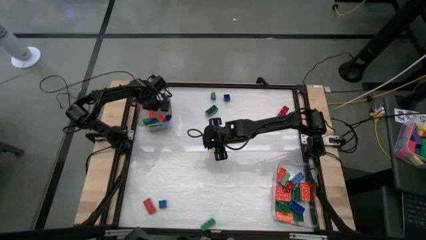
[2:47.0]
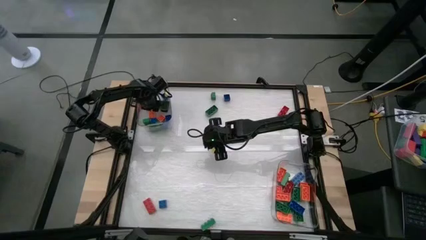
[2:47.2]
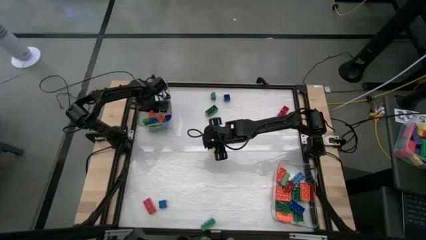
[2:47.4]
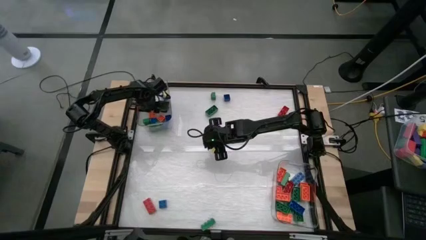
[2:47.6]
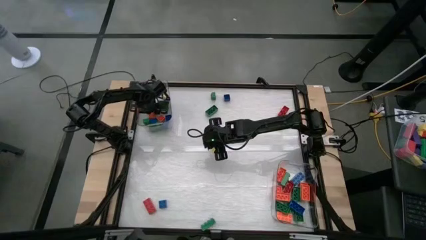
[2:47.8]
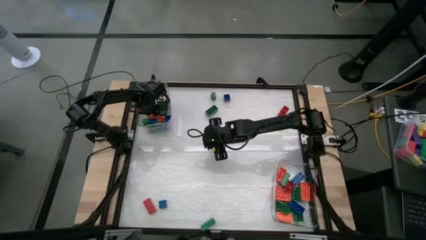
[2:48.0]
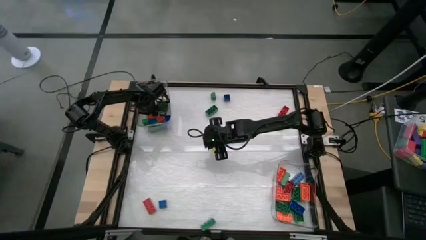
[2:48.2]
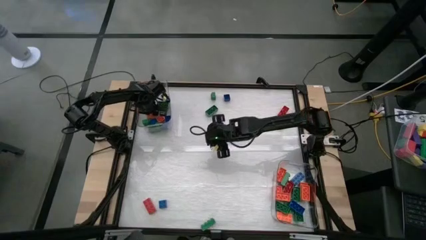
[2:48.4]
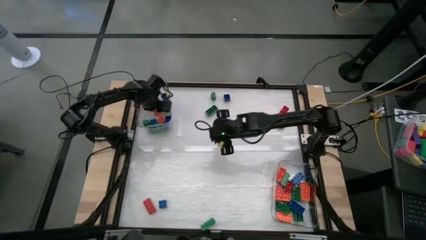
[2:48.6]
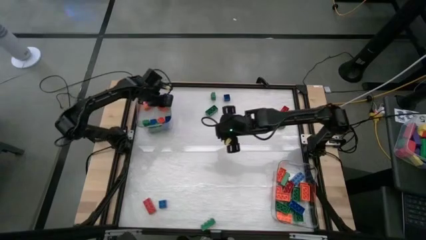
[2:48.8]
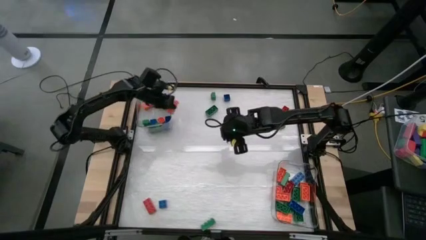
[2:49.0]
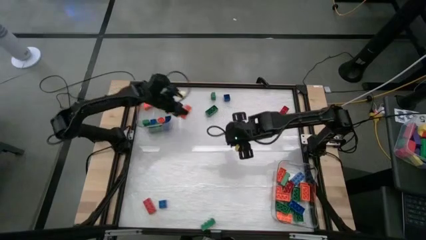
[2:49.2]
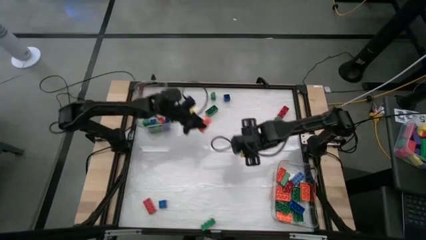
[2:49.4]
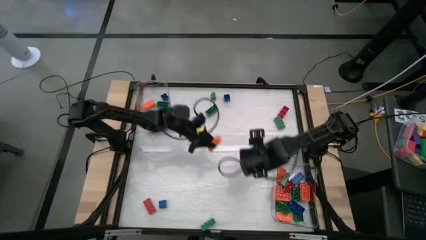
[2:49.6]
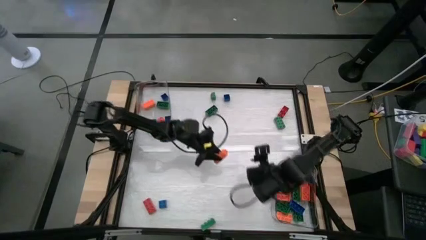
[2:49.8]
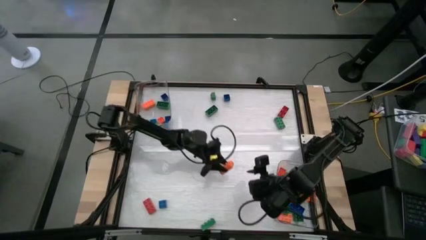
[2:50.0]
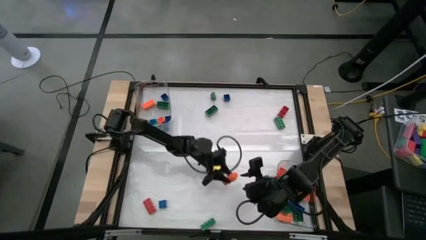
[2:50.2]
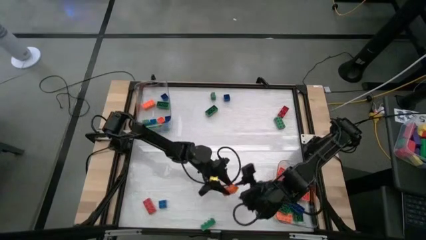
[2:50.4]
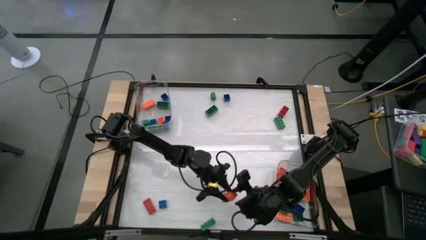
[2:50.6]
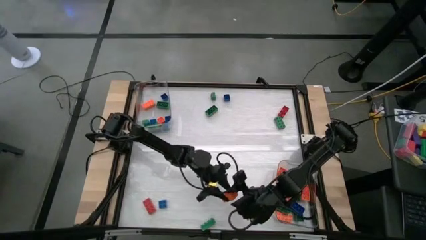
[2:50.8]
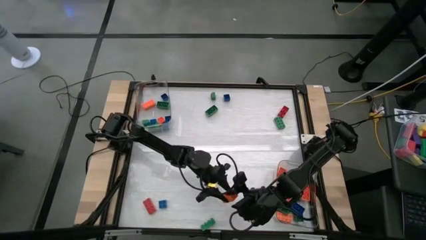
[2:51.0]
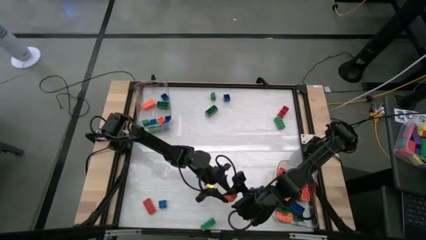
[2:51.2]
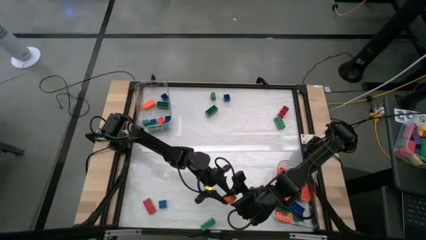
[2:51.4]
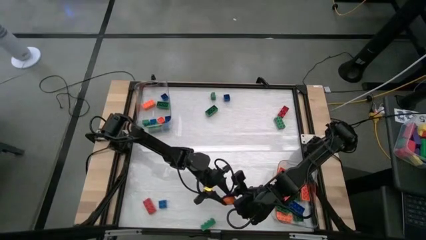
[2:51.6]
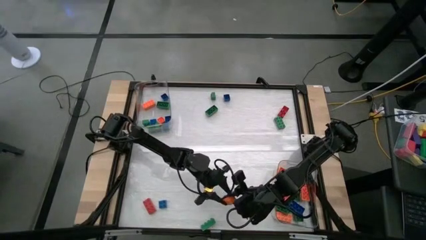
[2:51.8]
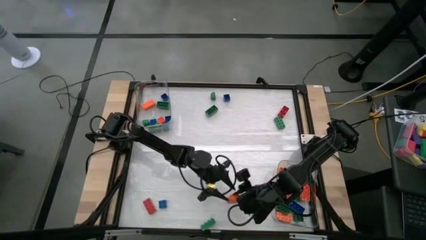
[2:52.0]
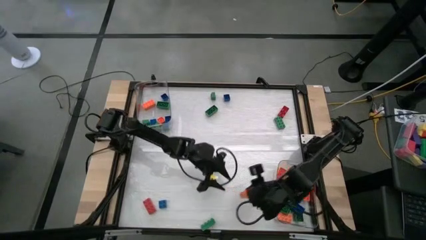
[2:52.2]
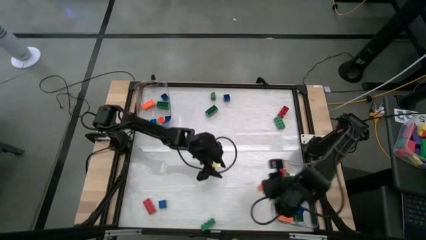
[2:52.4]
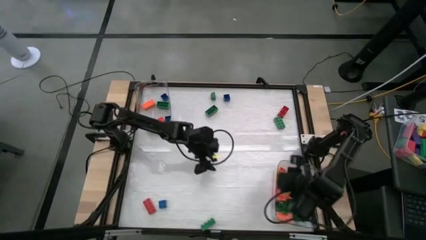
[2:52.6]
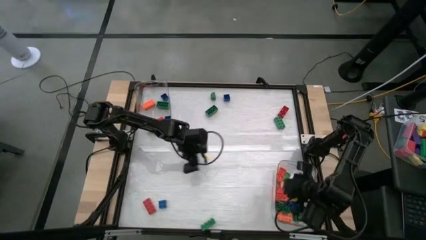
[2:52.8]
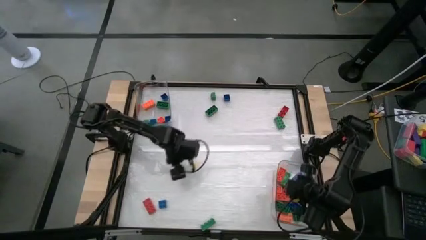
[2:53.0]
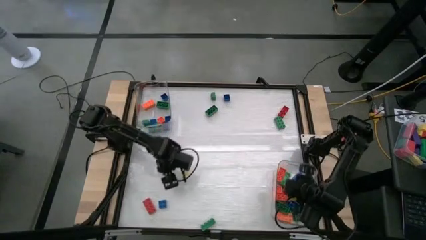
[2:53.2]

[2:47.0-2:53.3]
Task: Sort blocks by size
Put the 8 stud orange game piece into the bottom transparent bin

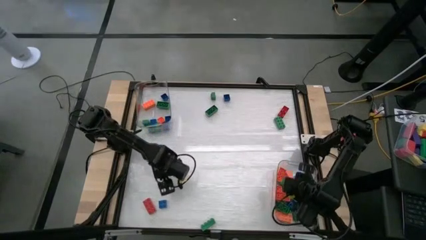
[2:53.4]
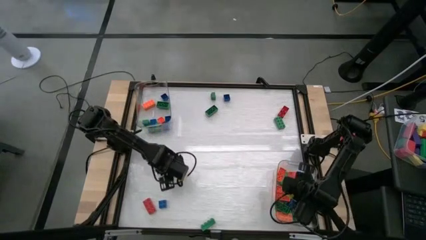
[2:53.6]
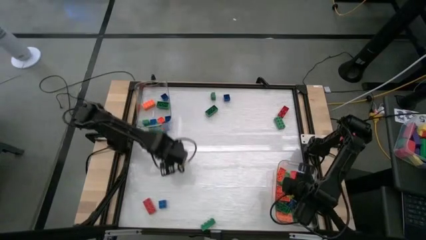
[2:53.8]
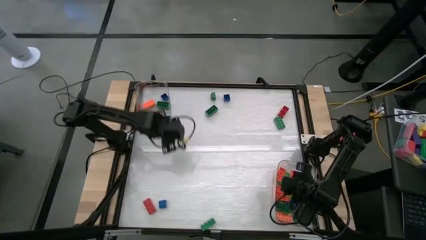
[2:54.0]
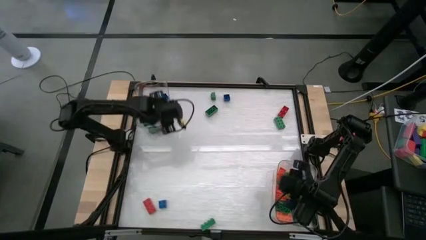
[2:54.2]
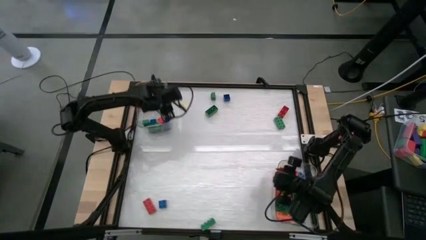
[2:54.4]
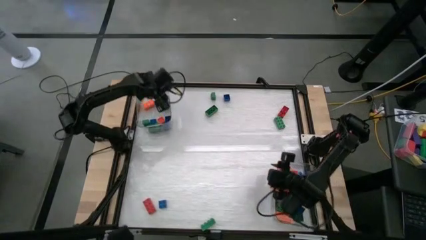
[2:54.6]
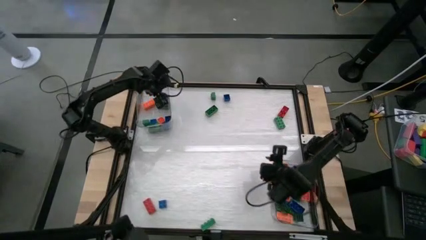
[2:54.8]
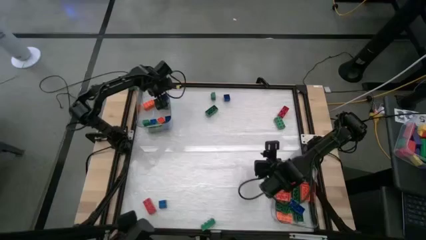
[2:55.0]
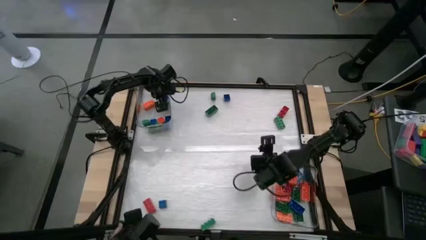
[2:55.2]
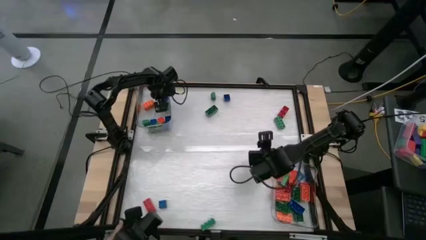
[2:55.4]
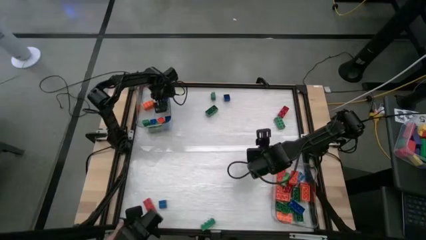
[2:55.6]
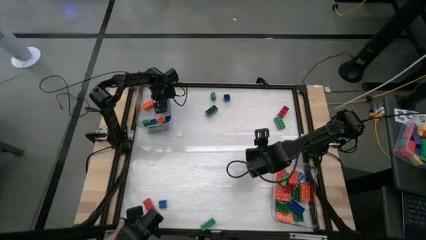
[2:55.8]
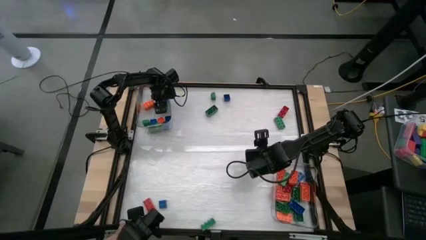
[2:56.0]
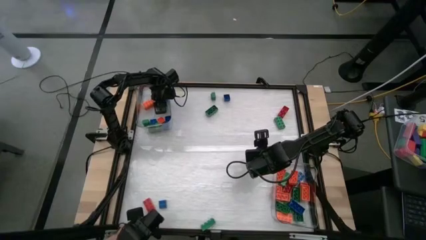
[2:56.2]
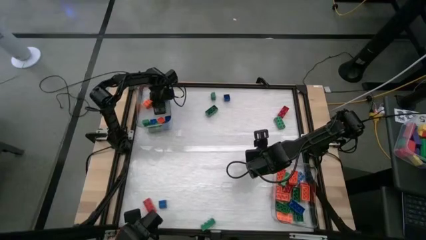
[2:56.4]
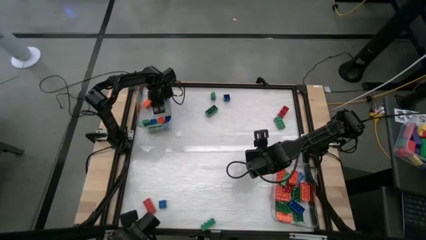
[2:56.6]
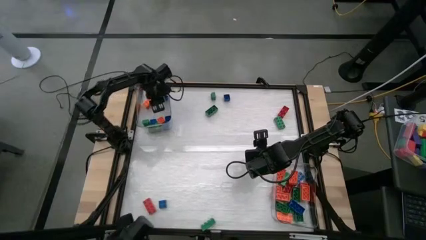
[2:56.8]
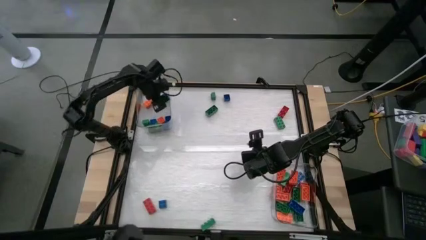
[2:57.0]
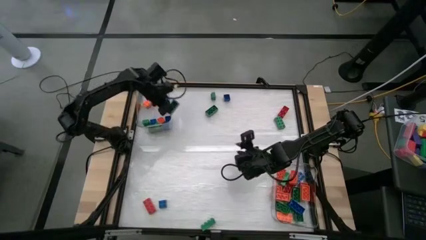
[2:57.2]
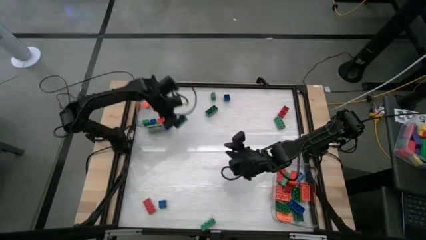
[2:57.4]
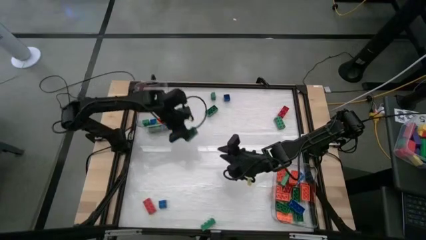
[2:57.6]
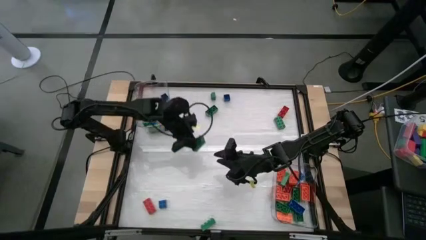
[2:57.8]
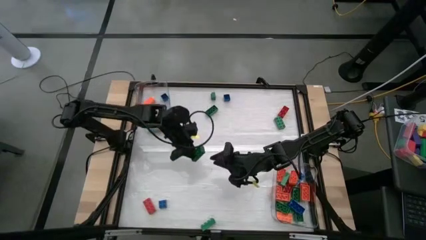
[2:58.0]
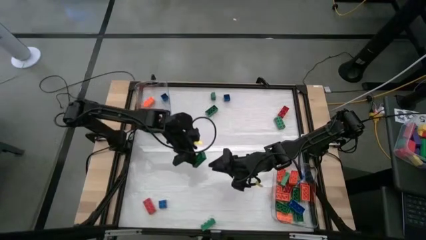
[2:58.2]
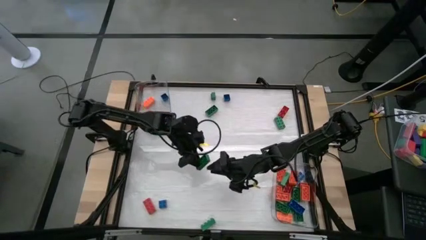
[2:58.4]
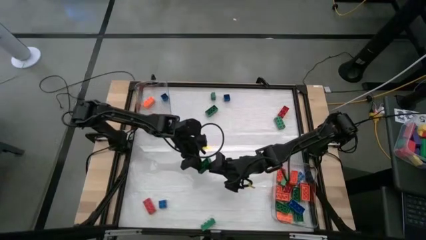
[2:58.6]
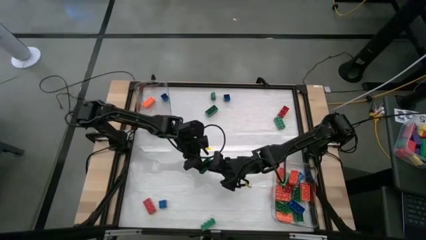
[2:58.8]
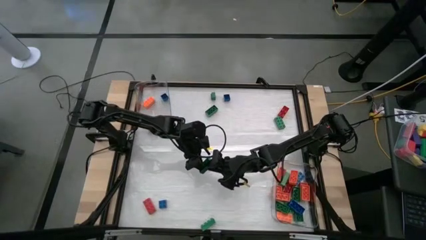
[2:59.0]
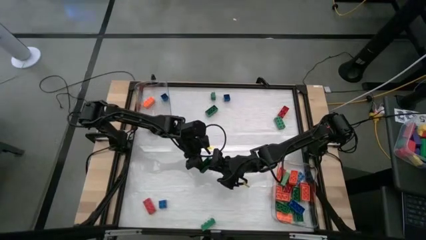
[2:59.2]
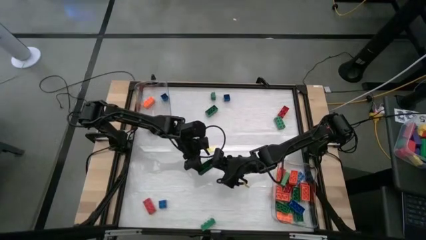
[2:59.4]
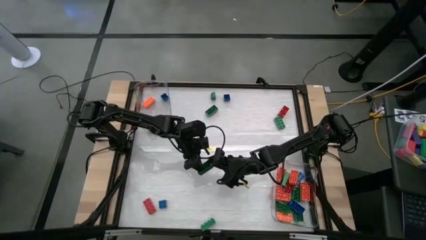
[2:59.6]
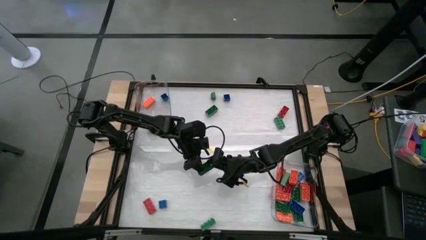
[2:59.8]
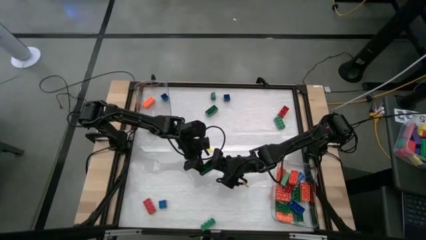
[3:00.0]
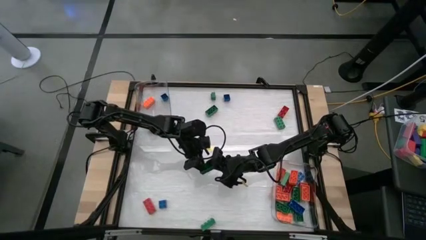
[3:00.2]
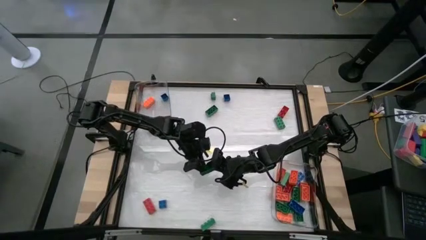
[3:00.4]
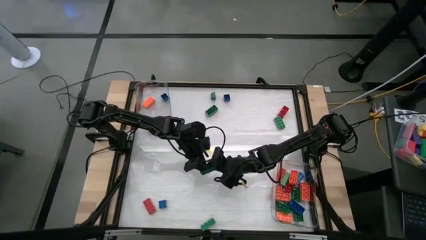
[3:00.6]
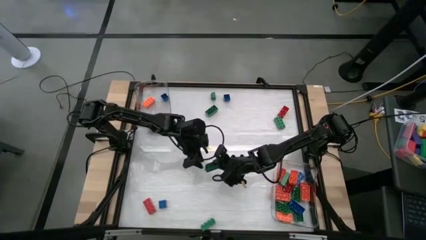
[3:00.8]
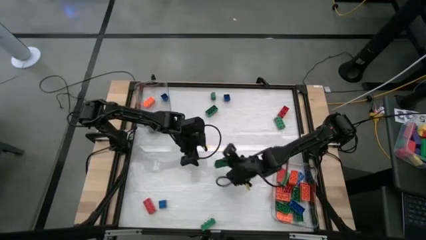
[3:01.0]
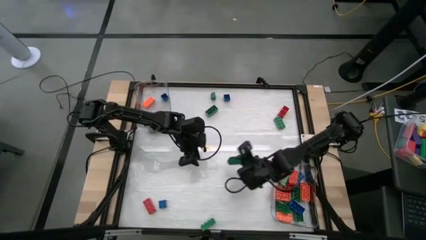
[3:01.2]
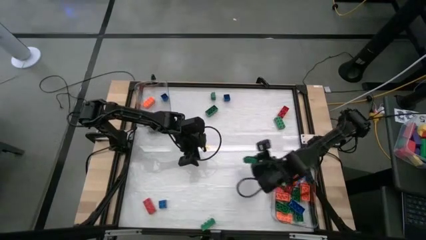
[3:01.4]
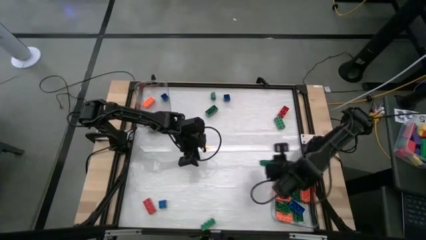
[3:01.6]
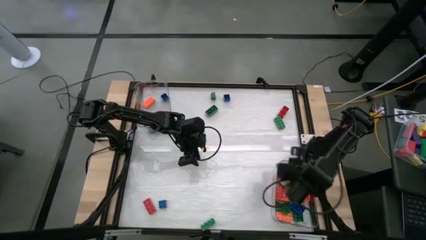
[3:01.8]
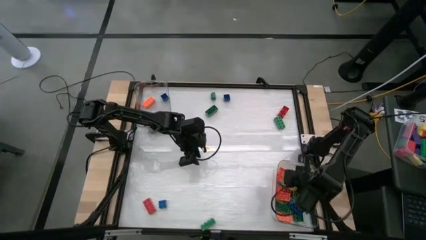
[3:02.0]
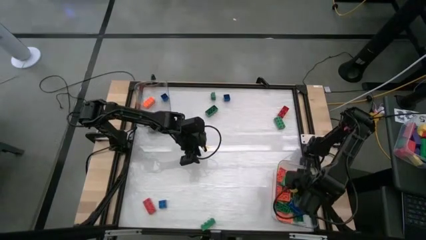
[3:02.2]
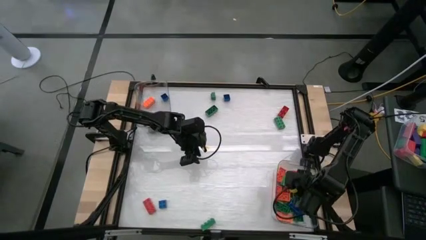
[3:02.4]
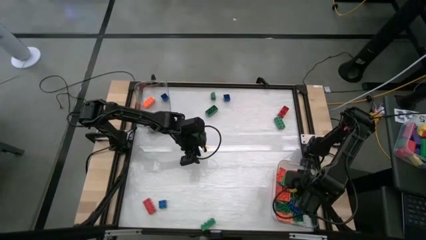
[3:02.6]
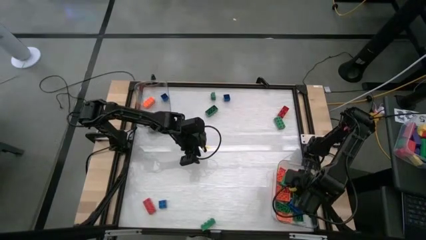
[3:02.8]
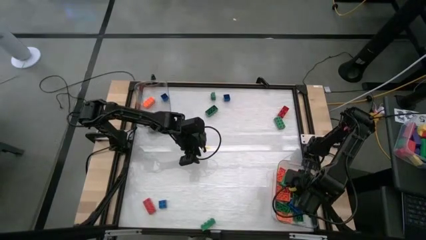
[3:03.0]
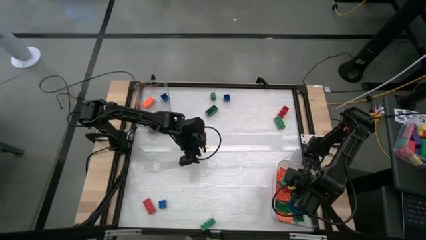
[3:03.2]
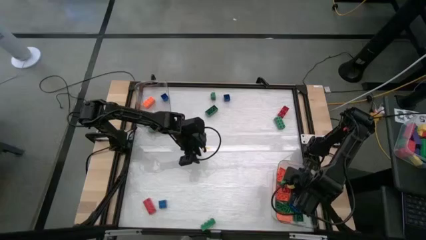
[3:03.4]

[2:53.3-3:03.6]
Put the 8 stud green game piece into the bottom transparent bin
